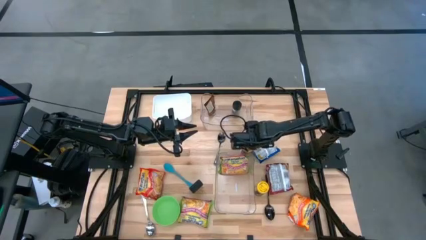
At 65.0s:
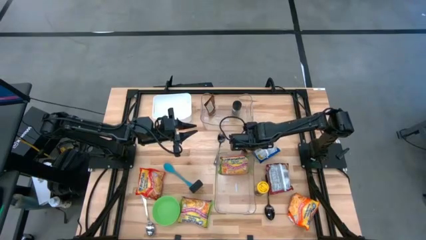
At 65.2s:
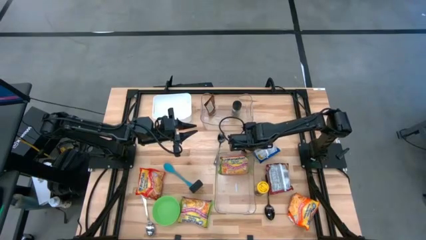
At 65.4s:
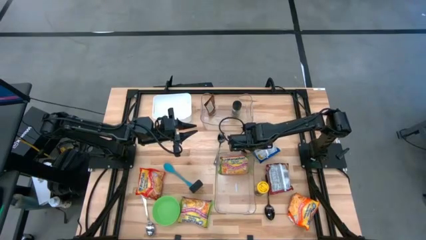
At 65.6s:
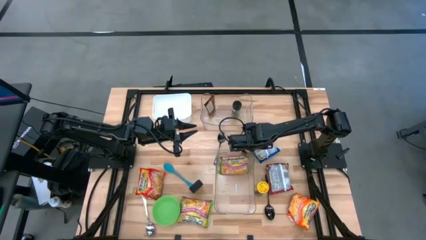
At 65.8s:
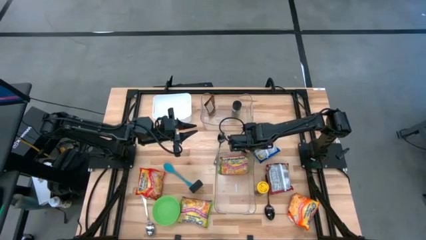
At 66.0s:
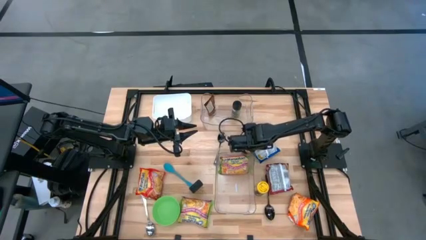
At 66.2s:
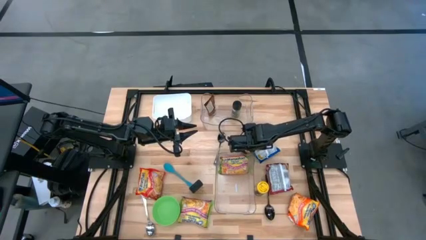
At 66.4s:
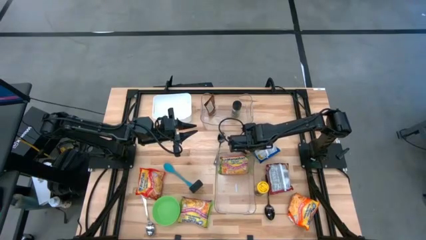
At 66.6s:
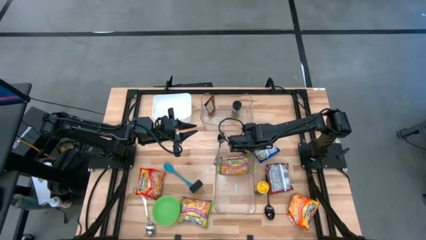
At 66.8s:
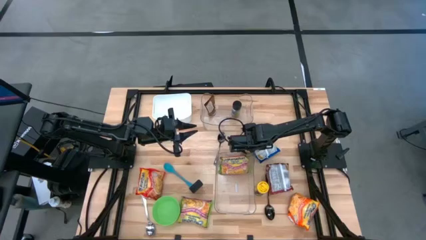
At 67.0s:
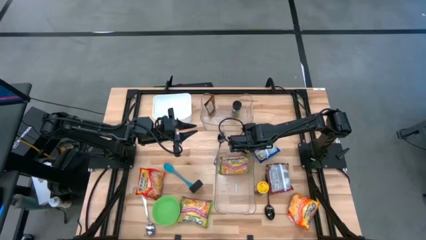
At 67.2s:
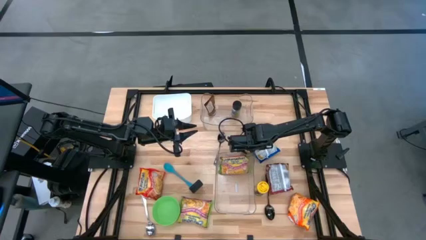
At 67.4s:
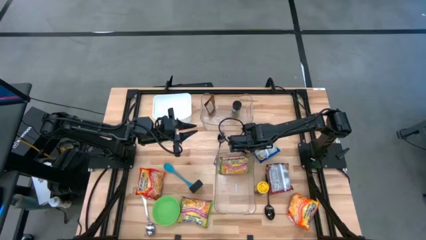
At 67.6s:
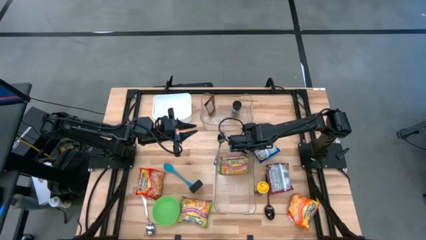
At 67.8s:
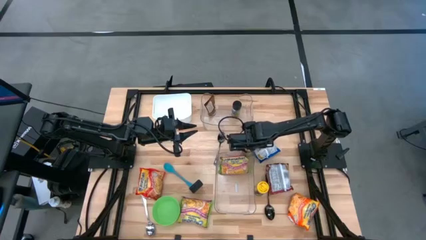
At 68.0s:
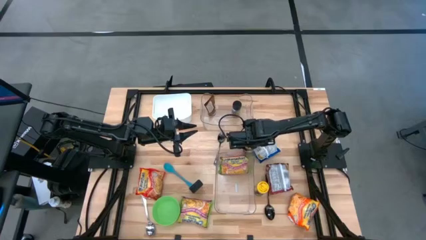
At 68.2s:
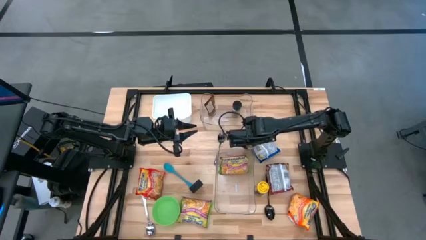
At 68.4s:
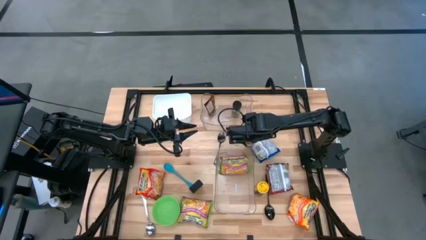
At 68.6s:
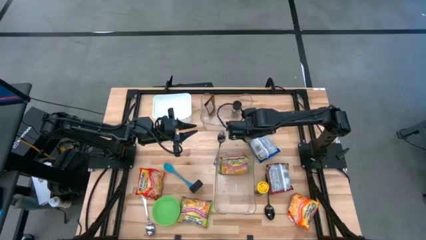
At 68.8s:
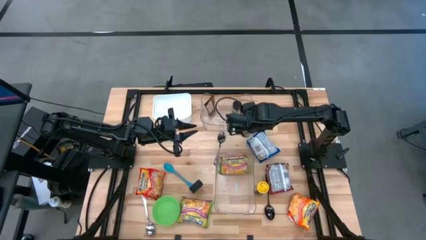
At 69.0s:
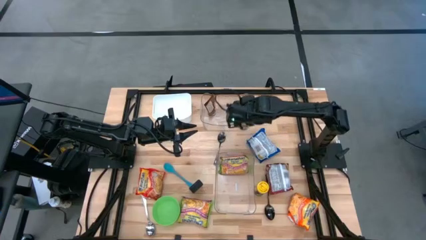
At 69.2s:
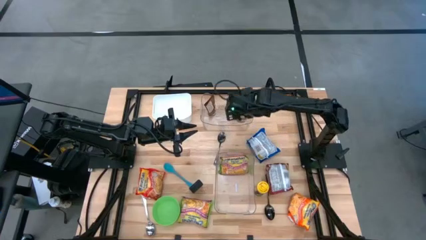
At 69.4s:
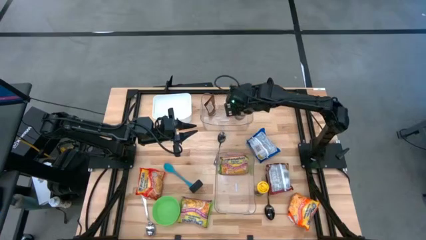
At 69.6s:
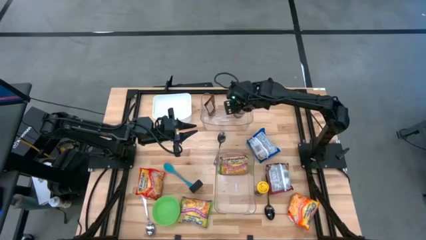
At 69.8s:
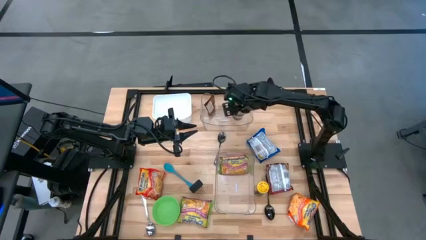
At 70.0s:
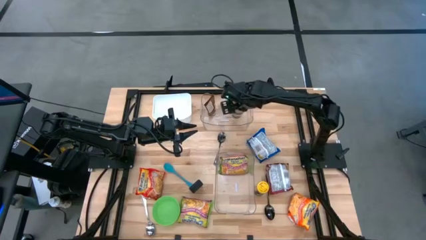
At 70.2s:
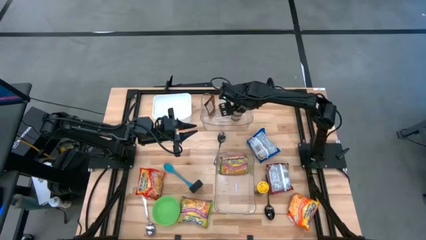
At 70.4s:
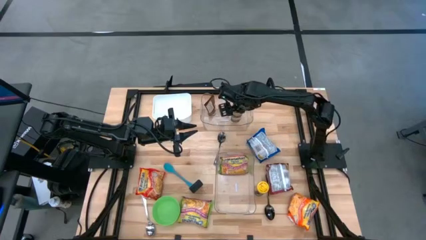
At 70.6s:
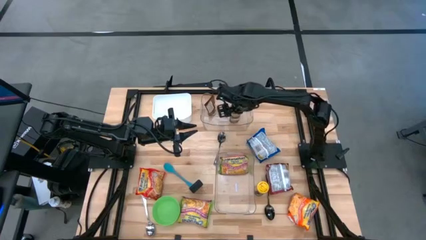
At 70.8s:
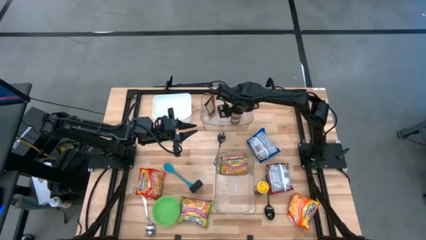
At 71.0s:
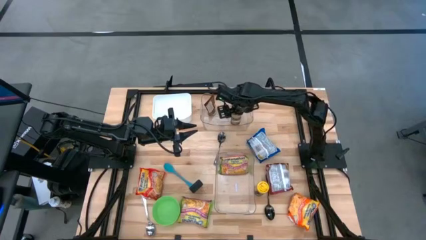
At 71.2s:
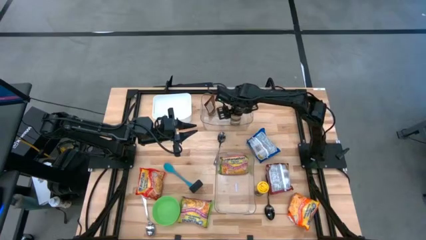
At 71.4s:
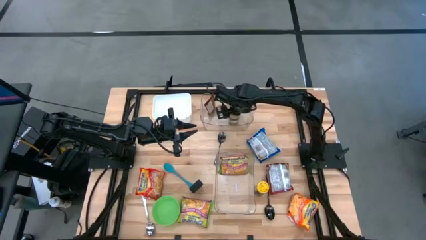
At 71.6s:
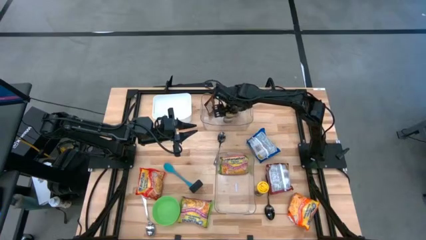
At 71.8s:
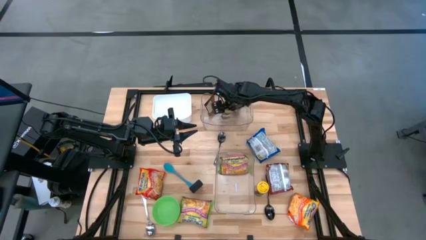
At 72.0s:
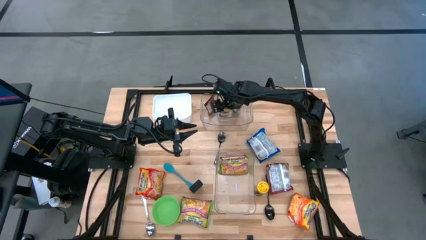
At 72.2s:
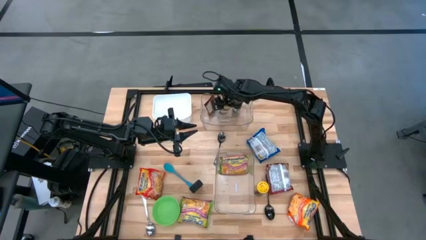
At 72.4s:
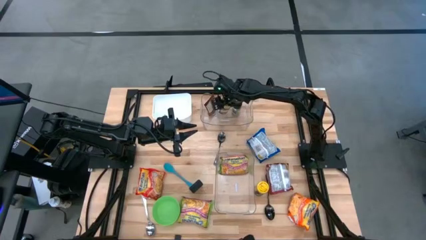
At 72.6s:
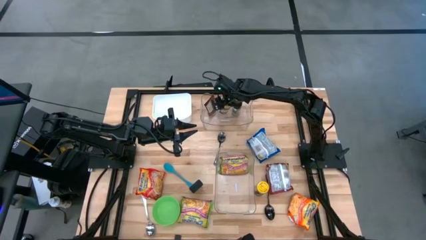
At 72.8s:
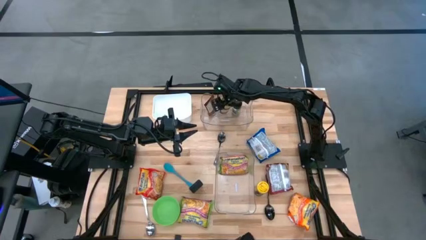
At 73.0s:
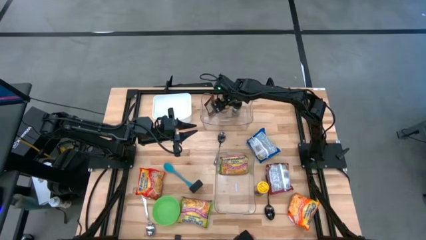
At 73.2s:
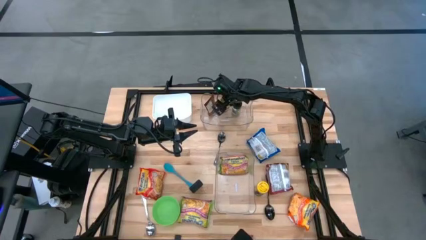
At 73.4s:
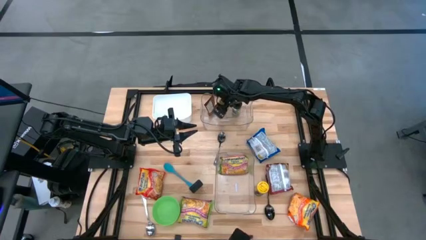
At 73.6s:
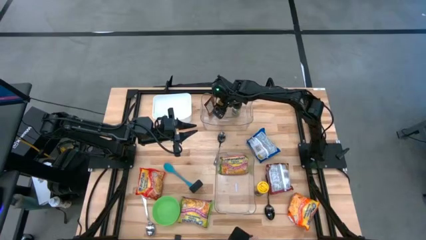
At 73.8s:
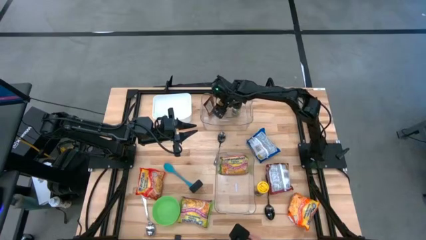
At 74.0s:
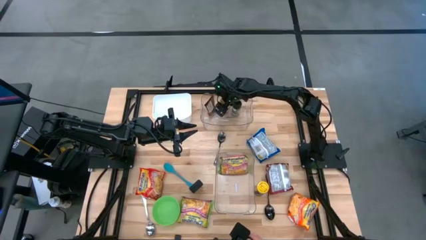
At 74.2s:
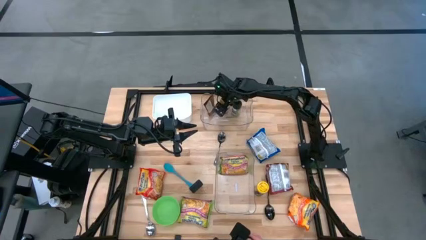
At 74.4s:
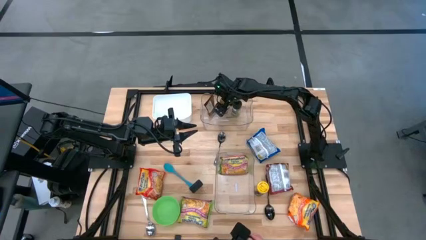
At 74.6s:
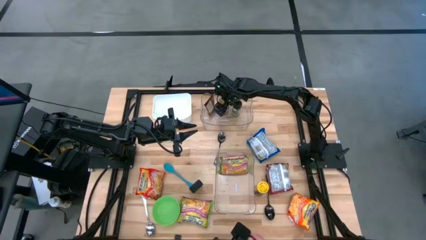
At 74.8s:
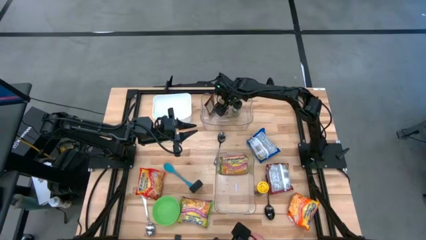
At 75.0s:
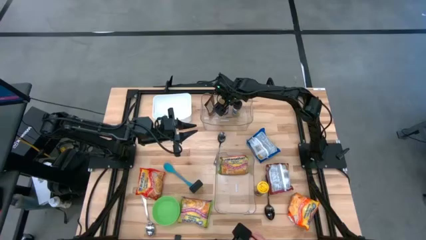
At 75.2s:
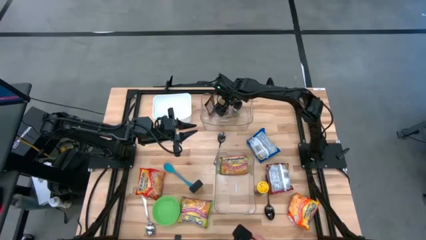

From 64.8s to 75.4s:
Task: Pick & Place Food Item
Put the gold seasoning bottle into the top transparent bin
